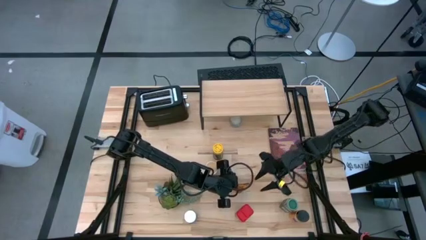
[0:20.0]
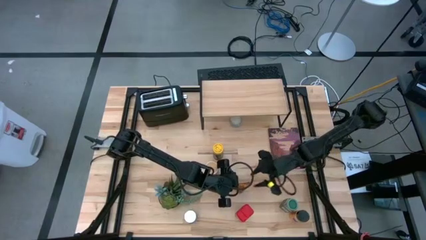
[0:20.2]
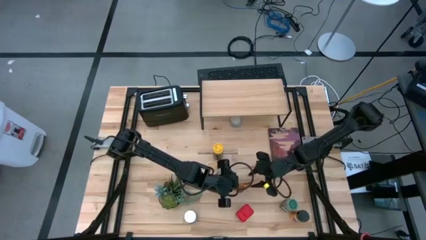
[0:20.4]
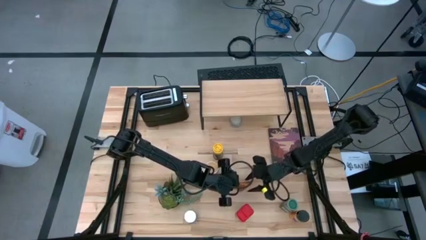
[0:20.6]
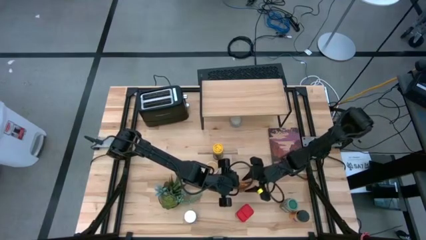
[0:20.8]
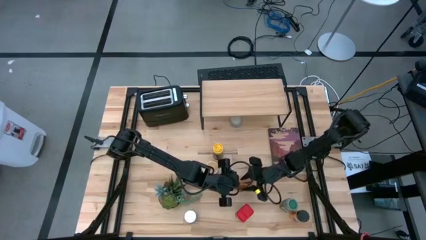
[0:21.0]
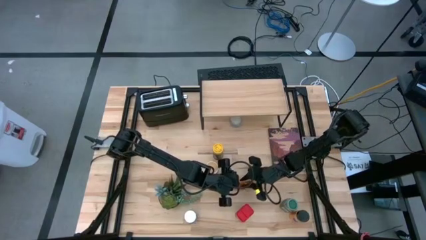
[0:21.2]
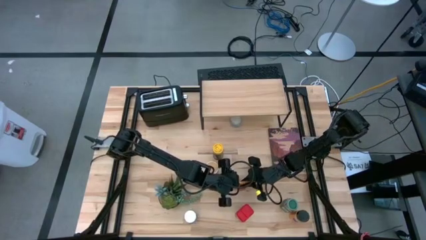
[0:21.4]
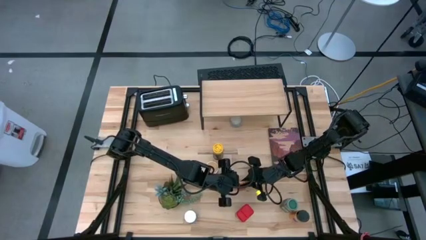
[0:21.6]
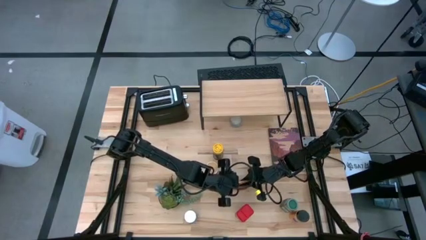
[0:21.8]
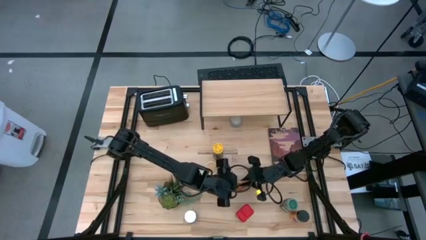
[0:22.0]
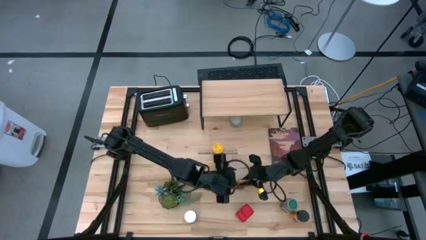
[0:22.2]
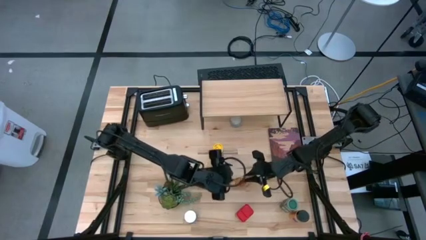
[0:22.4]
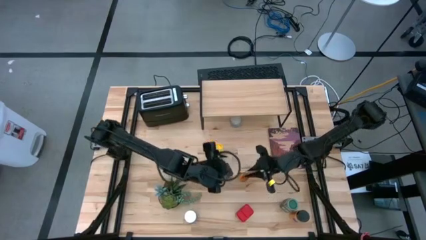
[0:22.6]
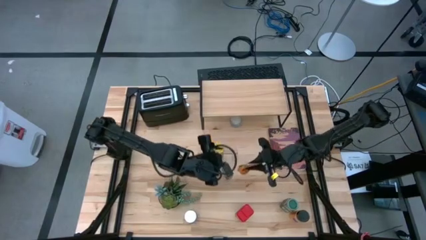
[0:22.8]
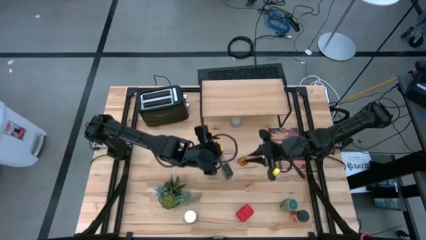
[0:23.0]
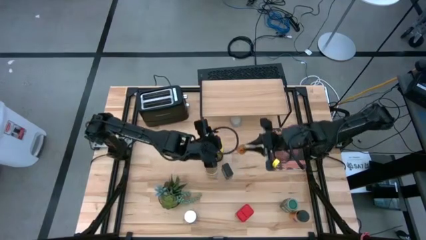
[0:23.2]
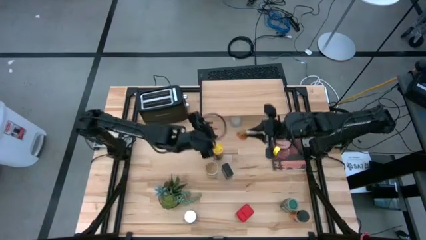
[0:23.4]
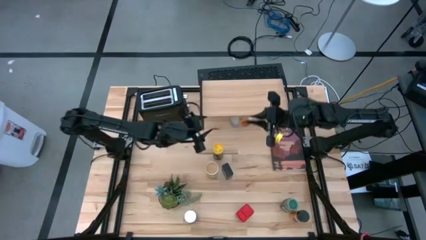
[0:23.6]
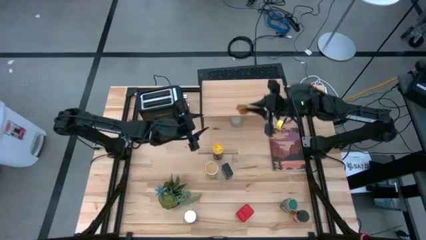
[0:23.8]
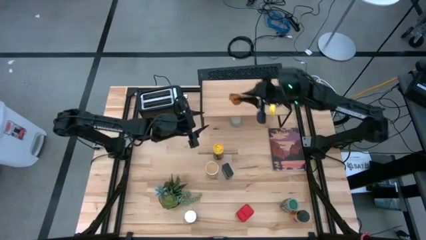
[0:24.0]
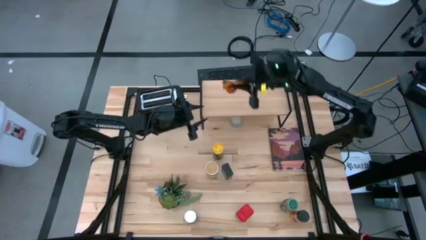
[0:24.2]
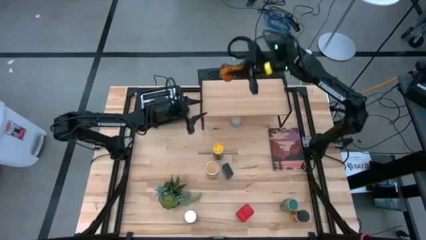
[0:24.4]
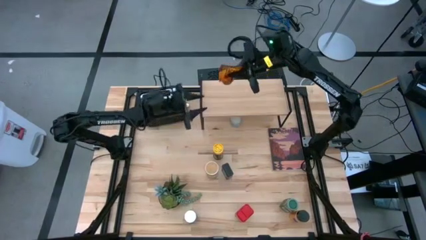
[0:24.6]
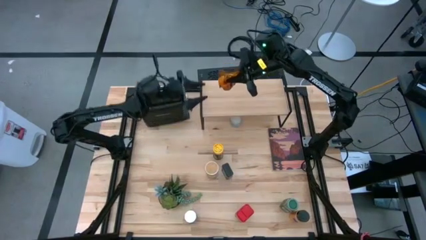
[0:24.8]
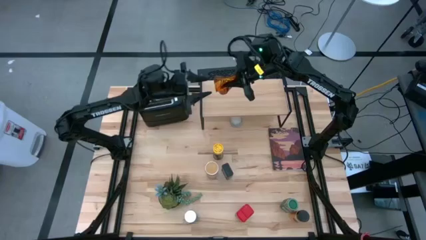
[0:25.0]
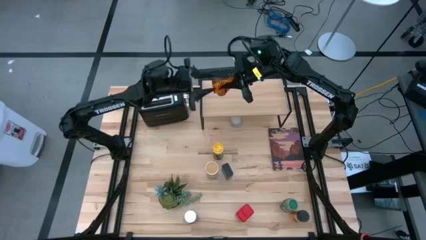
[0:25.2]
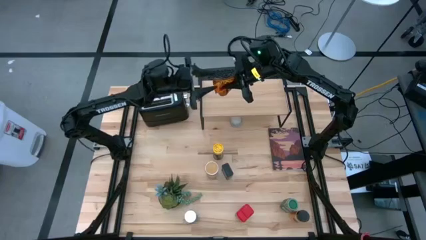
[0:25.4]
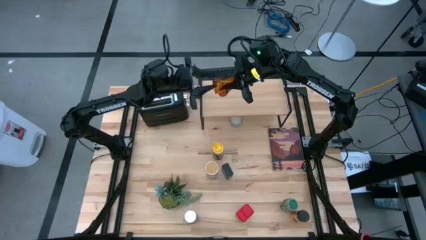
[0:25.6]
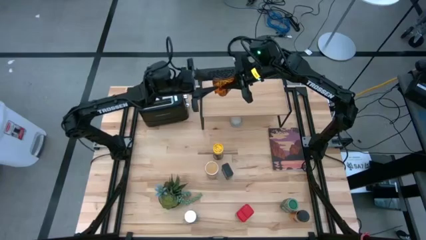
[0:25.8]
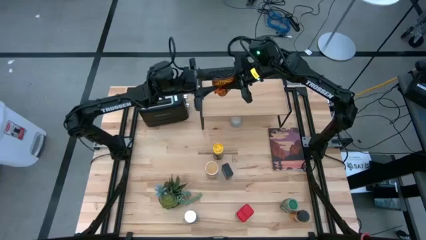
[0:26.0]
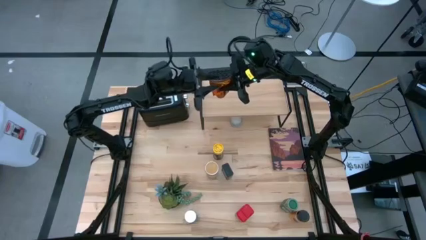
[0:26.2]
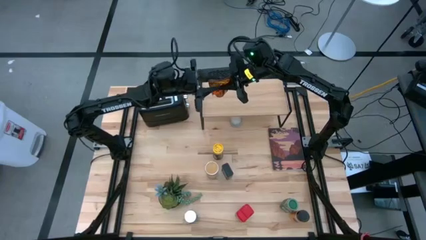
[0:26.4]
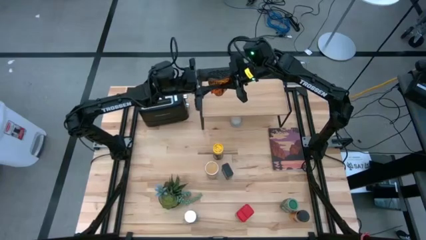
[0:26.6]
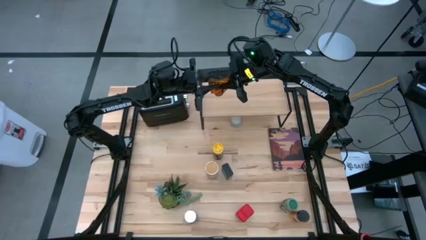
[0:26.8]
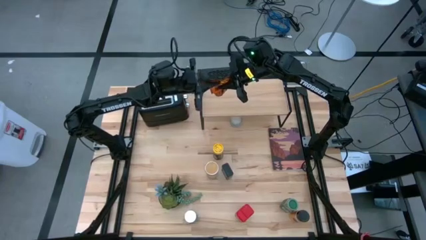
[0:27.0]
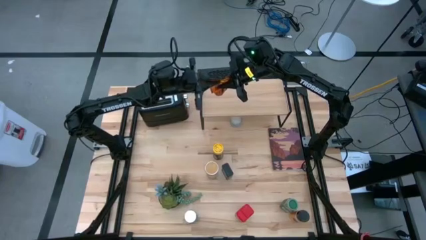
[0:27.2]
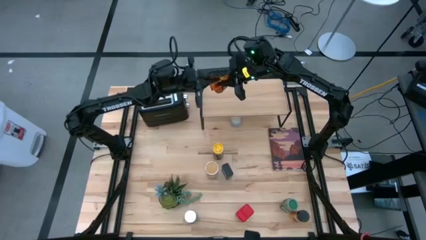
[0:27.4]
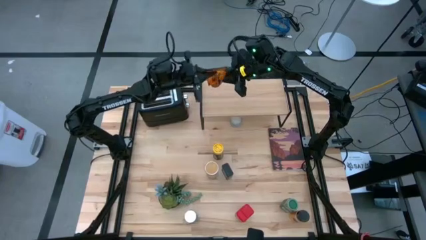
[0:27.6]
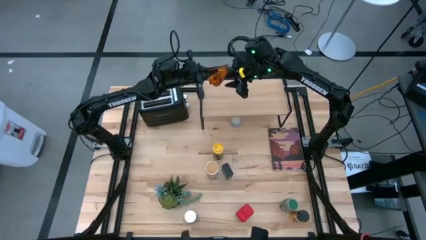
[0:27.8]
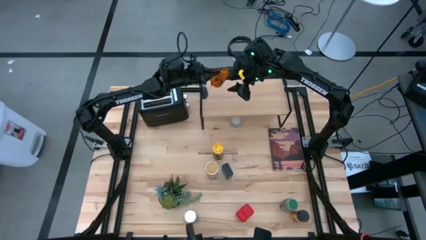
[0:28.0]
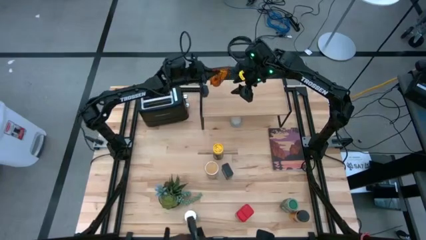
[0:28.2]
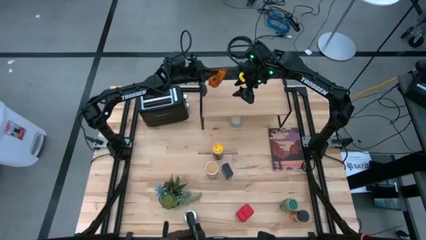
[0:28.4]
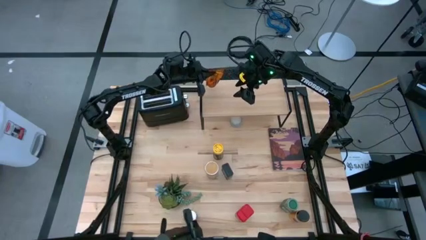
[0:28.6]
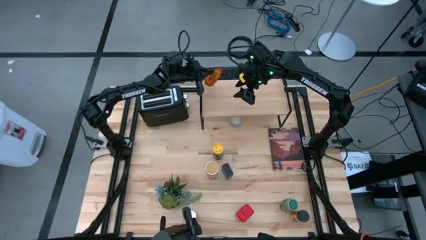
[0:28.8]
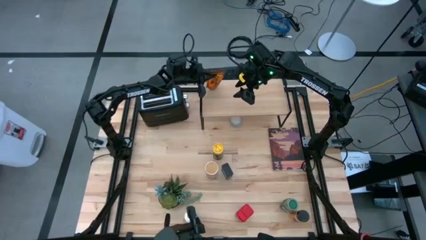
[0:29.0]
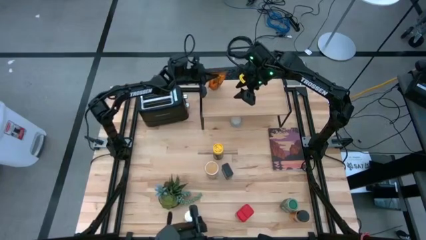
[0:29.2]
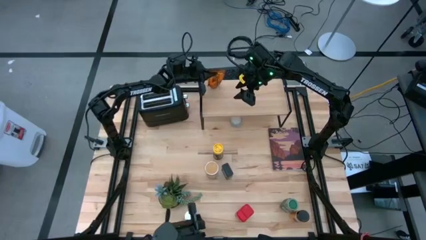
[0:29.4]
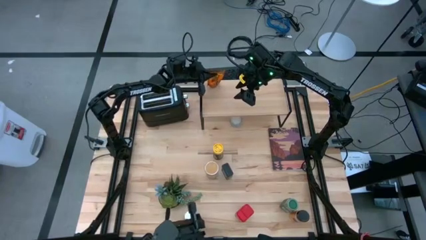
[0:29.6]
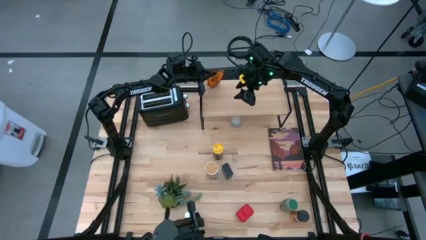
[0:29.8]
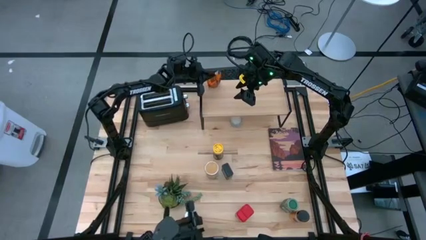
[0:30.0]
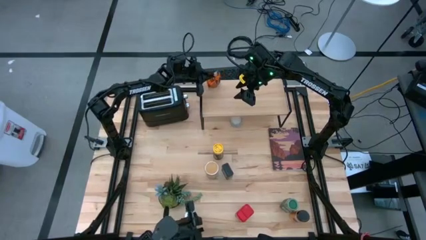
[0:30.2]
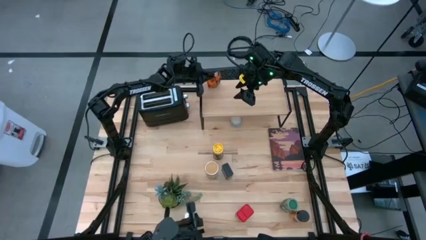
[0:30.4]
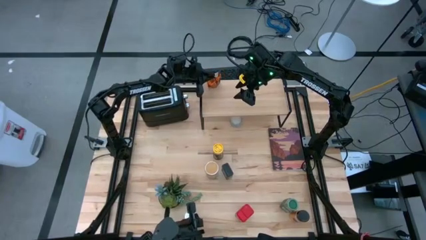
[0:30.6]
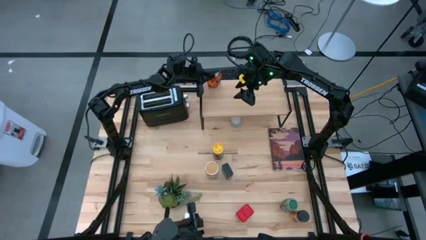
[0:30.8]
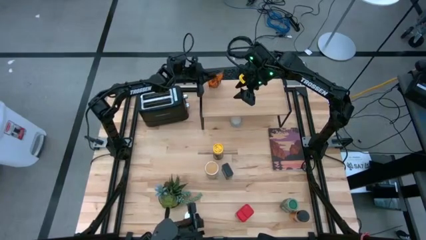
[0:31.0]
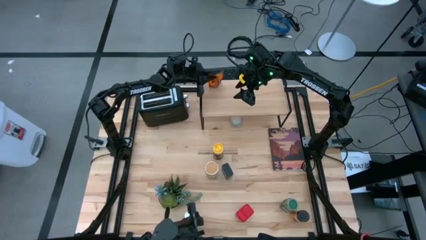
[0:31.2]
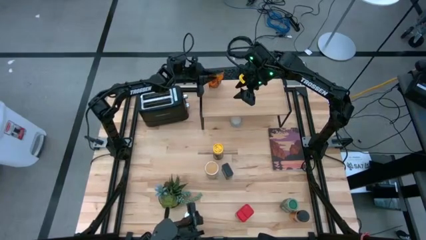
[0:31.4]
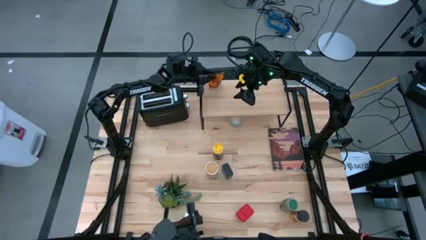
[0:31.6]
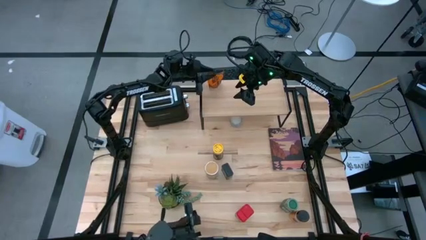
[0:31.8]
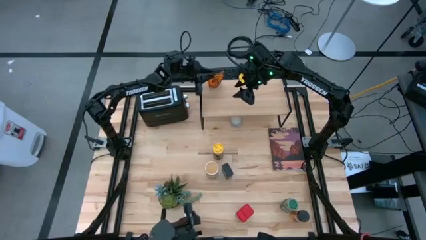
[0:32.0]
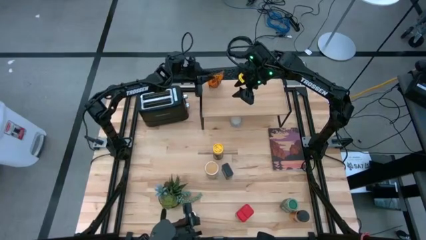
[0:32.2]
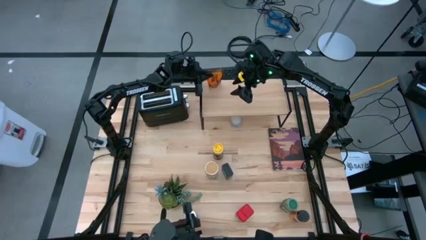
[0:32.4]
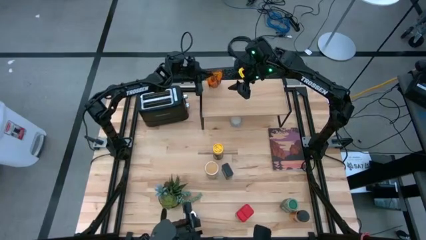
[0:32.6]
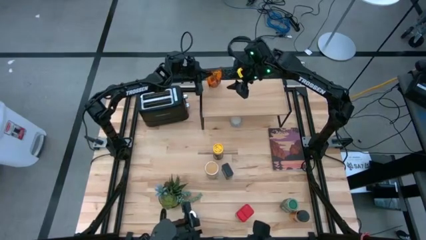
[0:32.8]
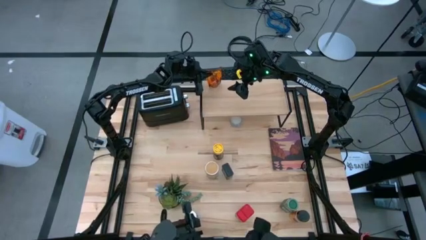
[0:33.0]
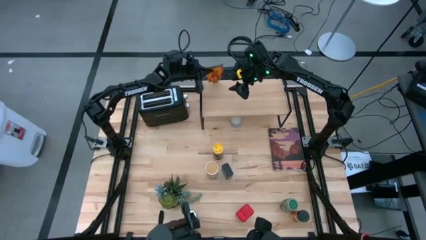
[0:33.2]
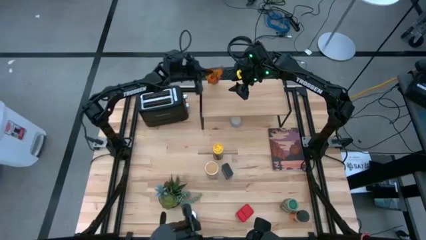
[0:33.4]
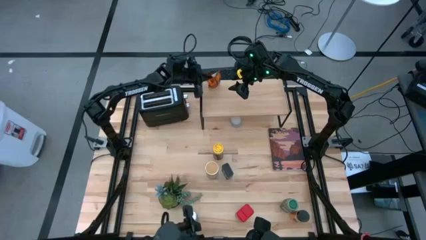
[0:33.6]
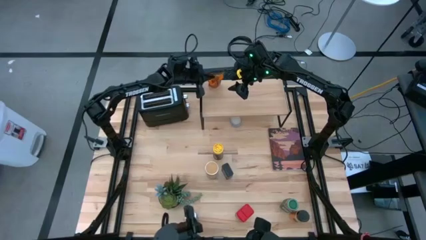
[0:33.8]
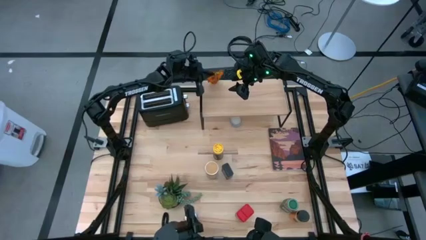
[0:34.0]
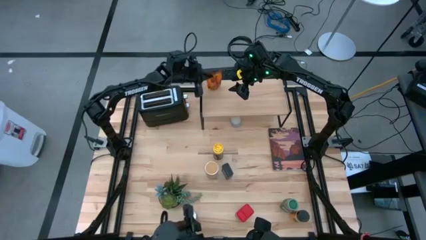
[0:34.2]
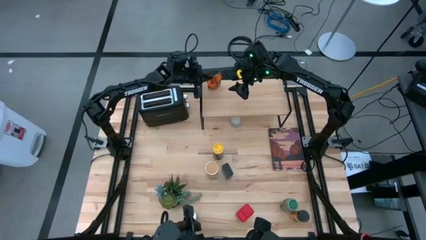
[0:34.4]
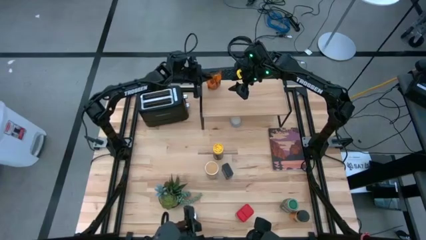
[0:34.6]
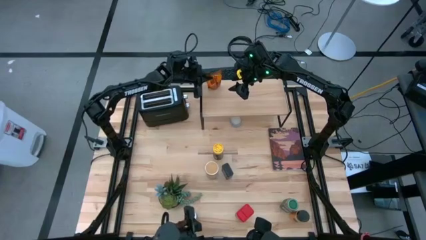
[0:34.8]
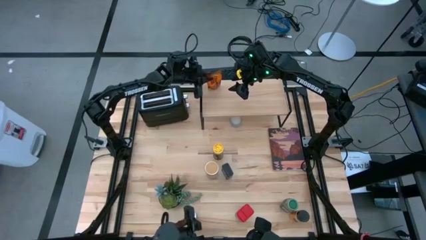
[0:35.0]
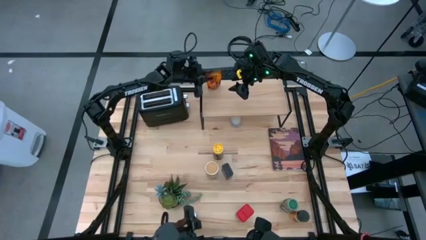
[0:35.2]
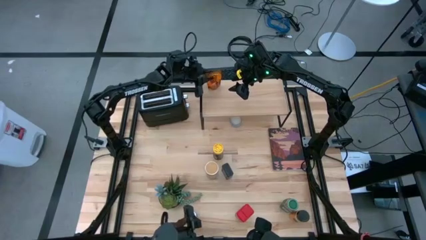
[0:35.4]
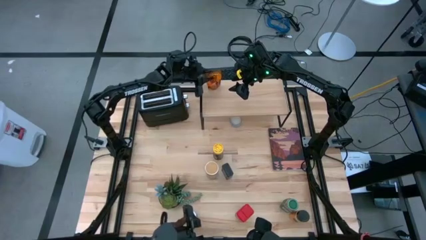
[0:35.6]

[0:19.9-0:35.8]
Task: Shelf spices
Put the brown seasoning bag on the shelf
